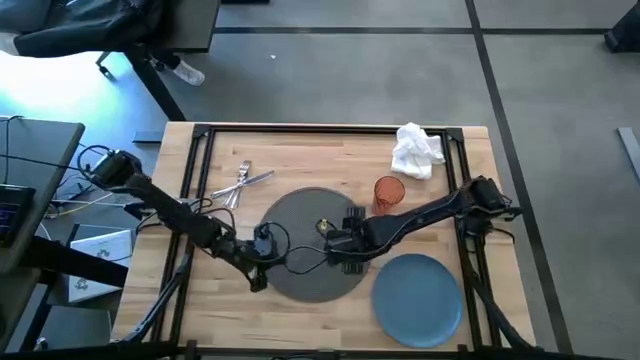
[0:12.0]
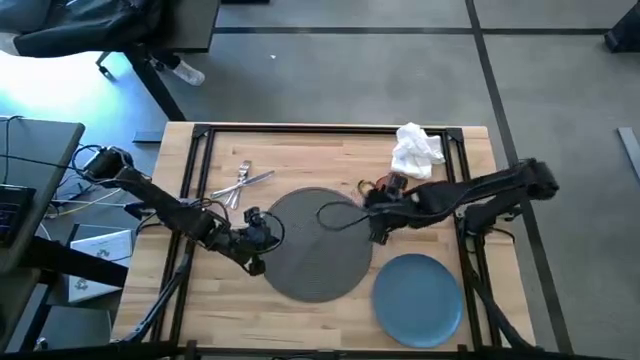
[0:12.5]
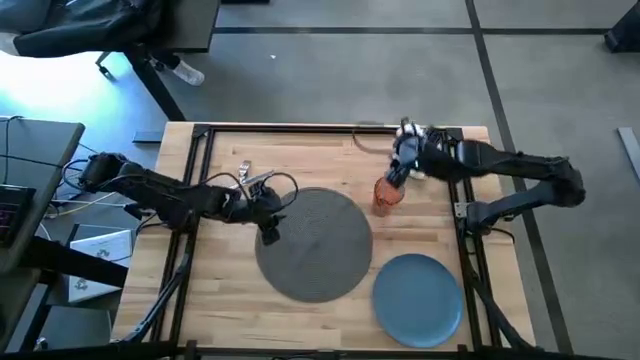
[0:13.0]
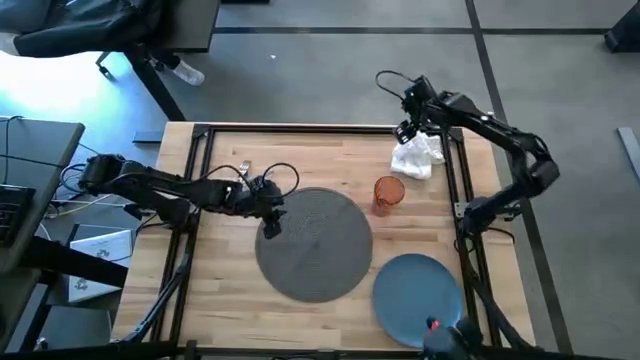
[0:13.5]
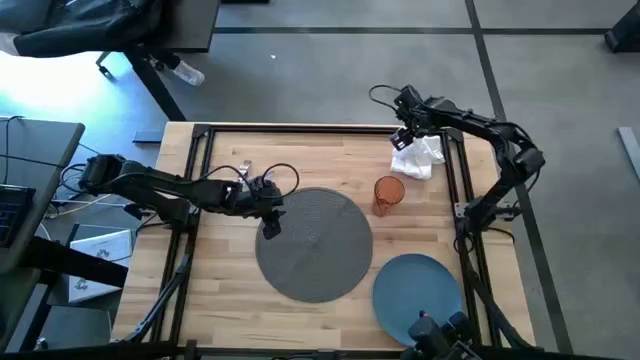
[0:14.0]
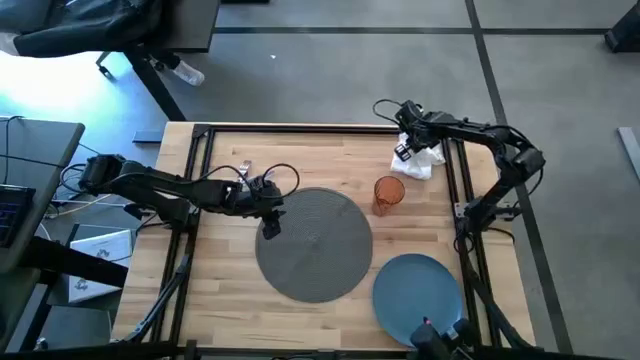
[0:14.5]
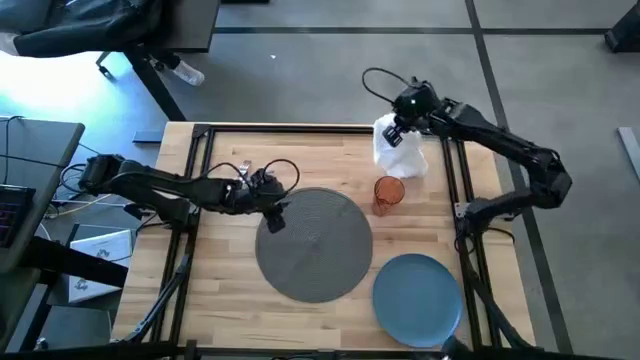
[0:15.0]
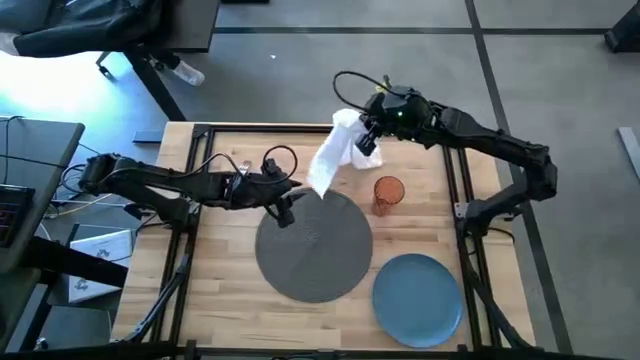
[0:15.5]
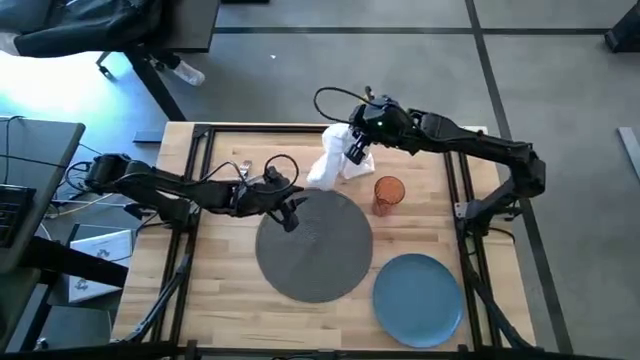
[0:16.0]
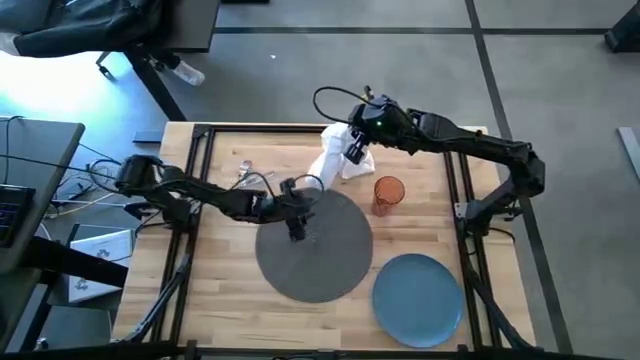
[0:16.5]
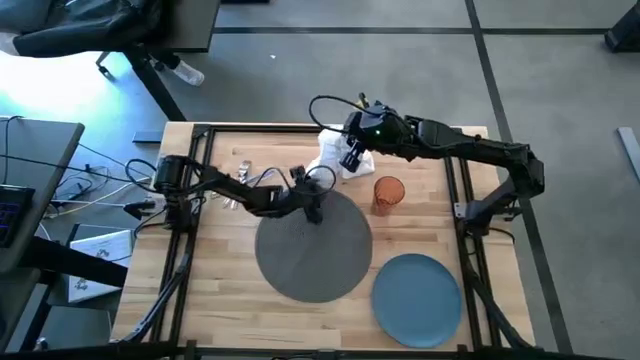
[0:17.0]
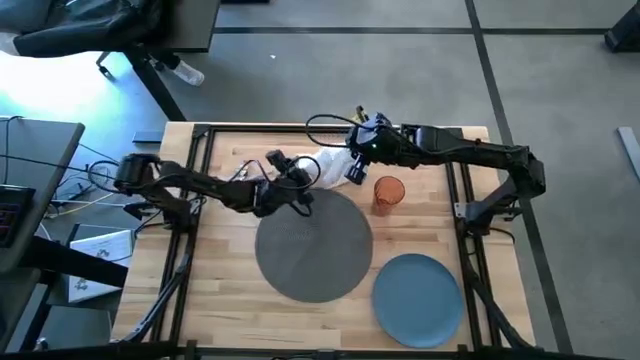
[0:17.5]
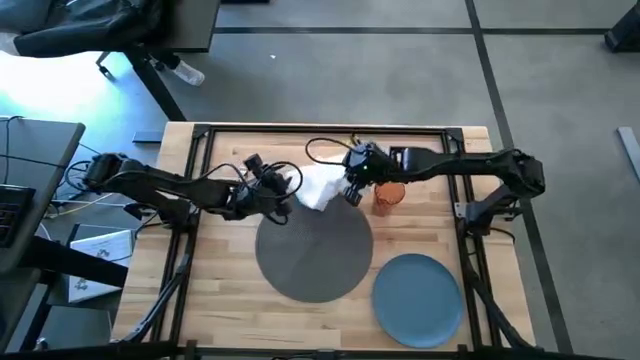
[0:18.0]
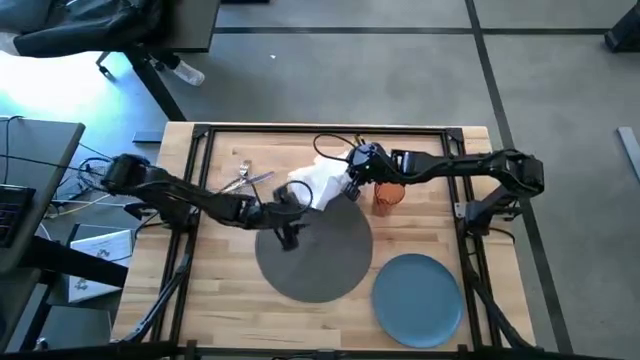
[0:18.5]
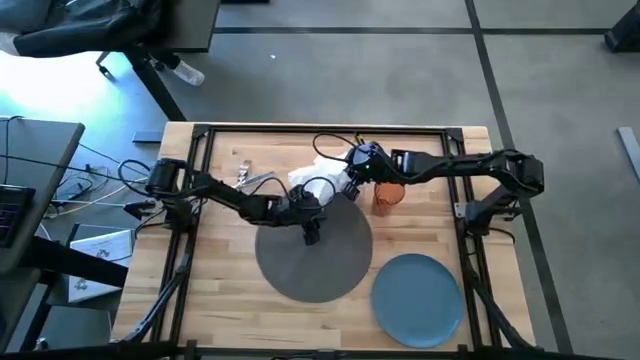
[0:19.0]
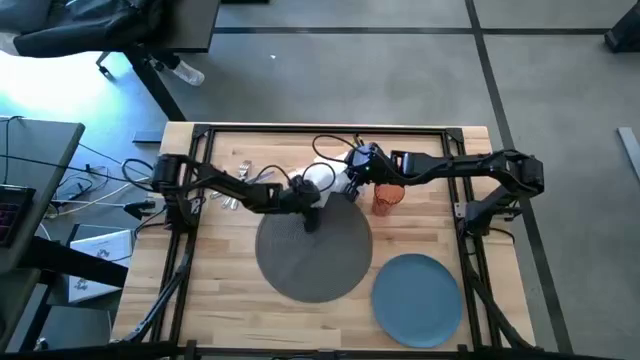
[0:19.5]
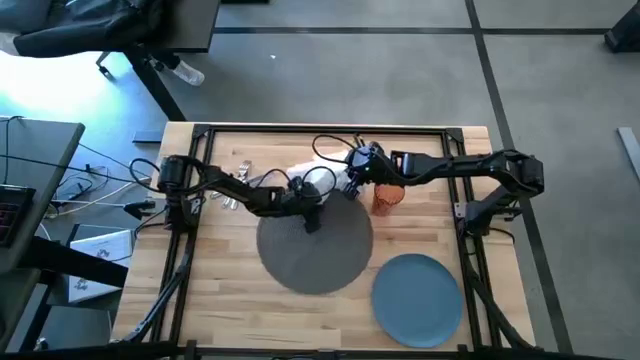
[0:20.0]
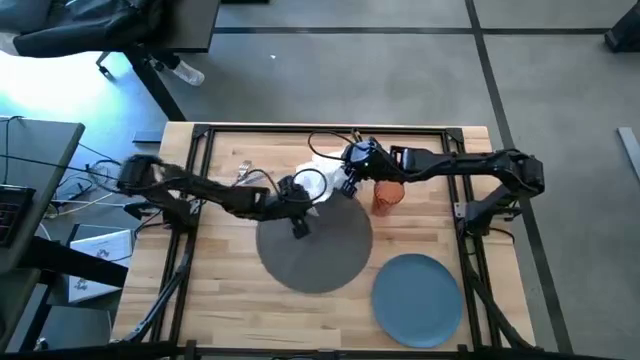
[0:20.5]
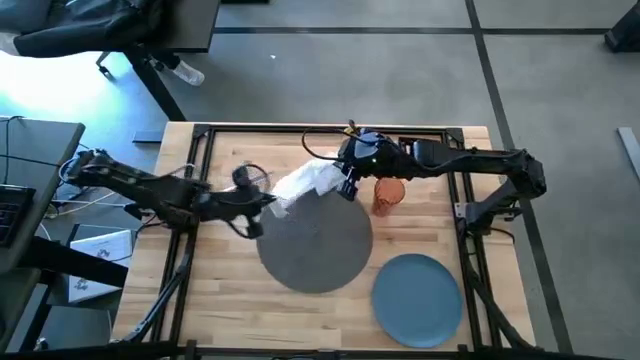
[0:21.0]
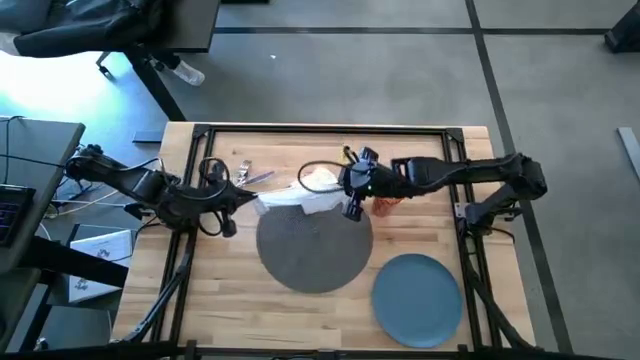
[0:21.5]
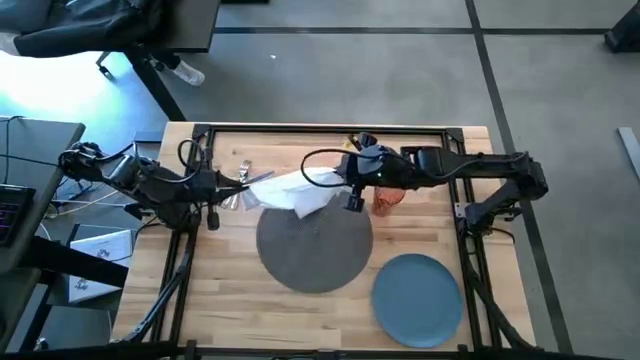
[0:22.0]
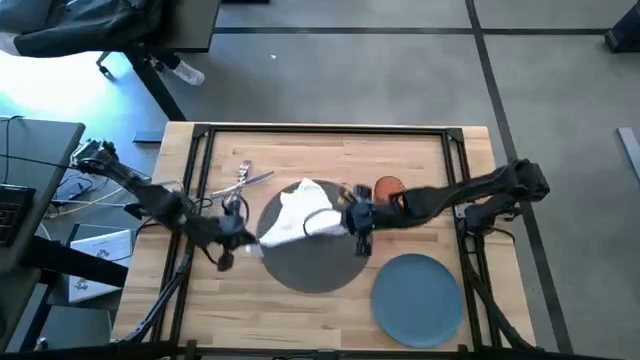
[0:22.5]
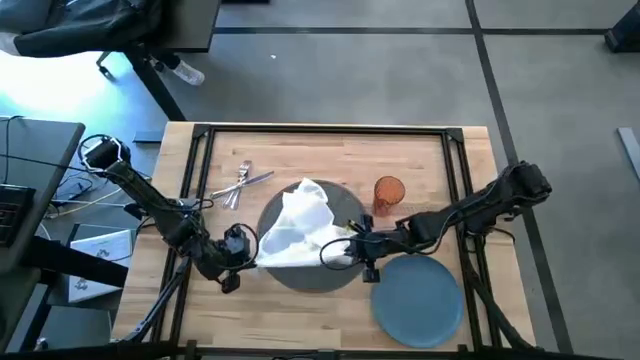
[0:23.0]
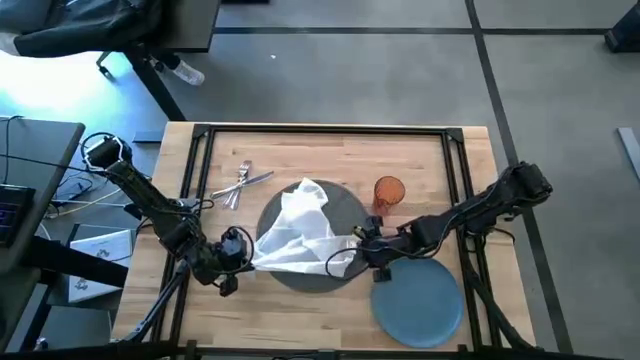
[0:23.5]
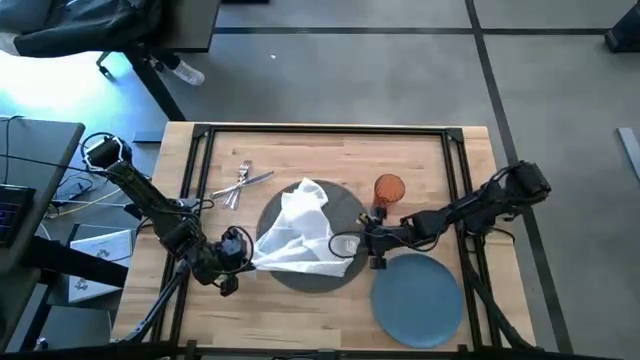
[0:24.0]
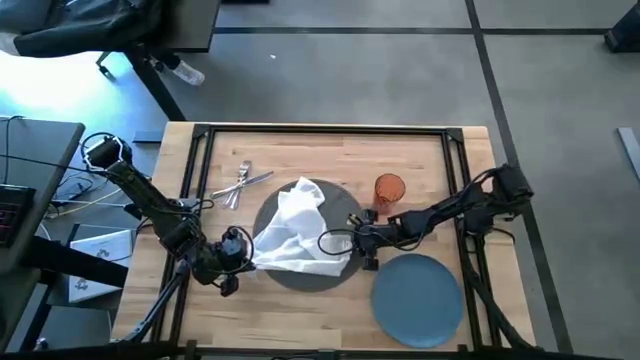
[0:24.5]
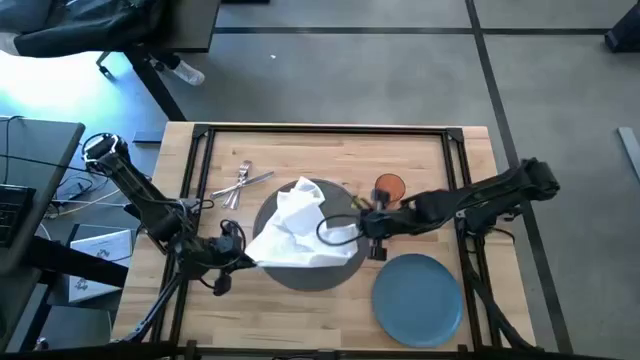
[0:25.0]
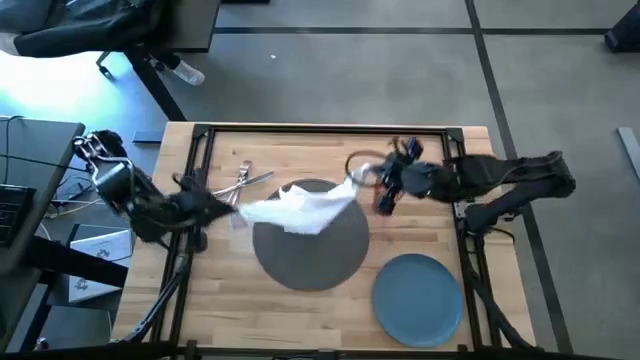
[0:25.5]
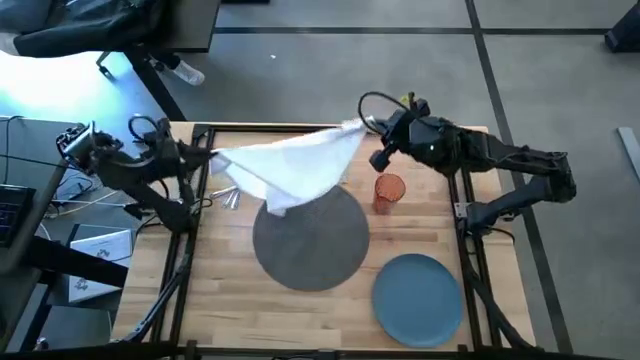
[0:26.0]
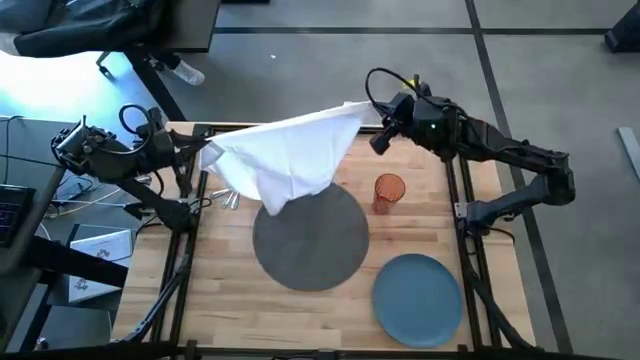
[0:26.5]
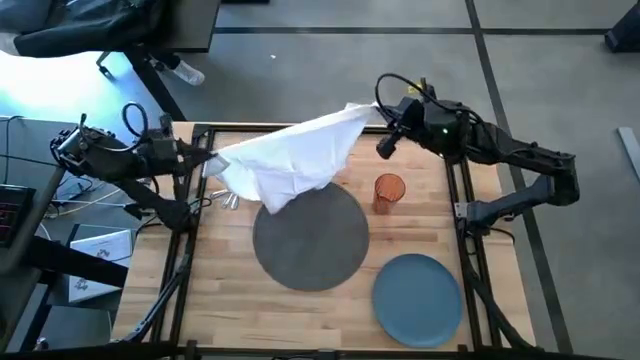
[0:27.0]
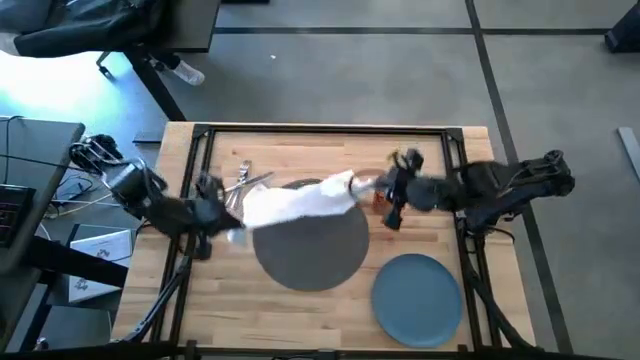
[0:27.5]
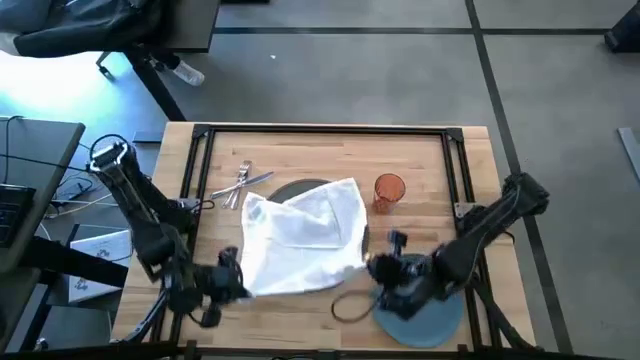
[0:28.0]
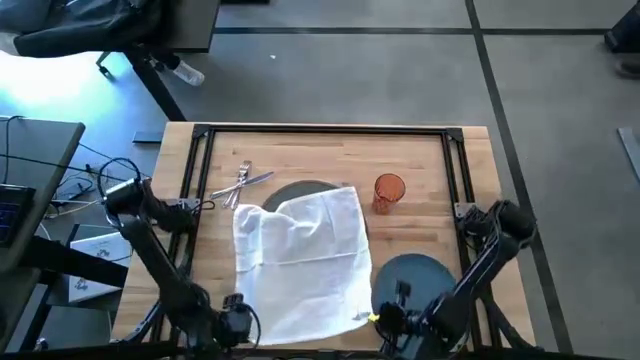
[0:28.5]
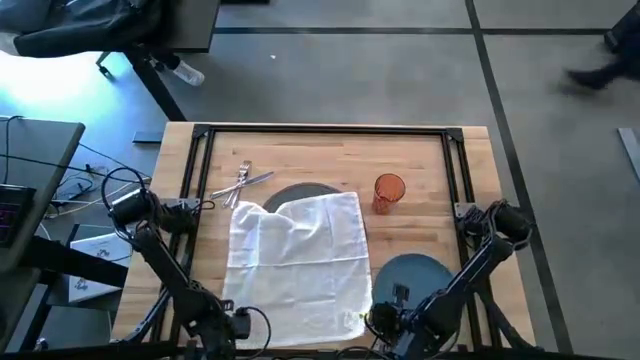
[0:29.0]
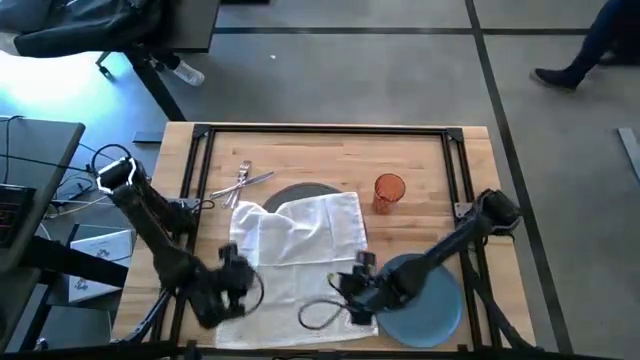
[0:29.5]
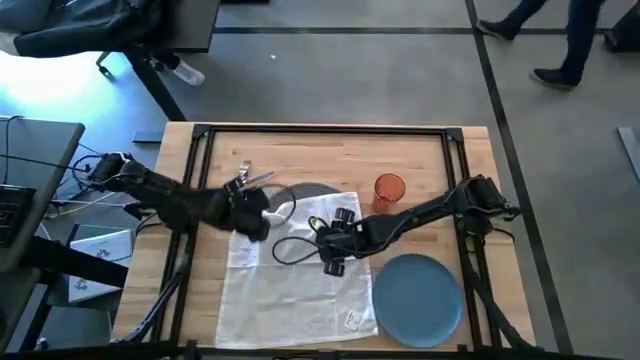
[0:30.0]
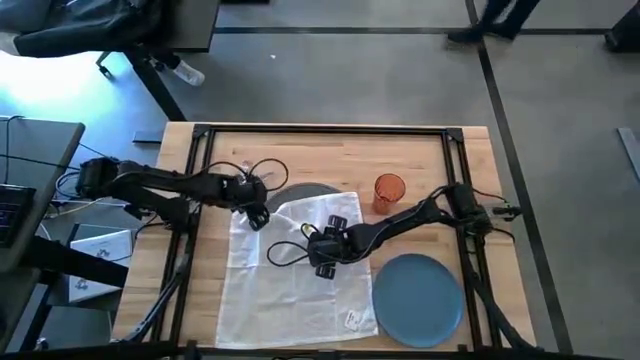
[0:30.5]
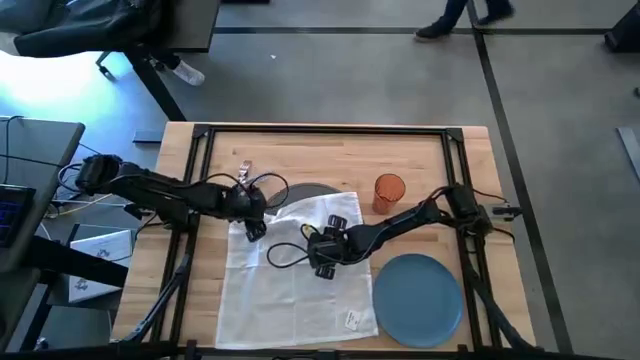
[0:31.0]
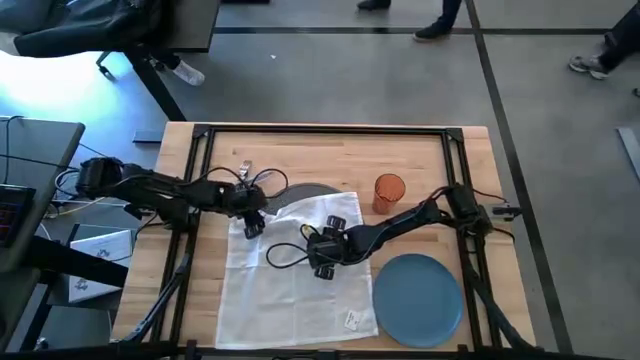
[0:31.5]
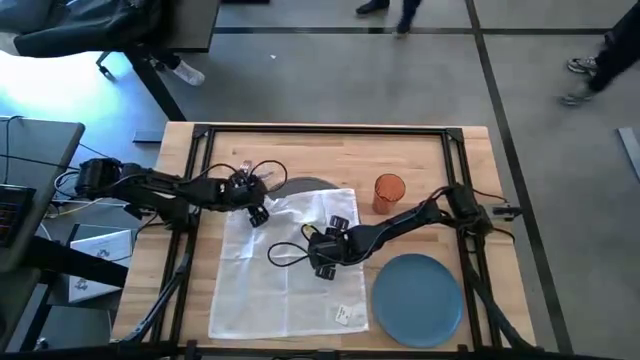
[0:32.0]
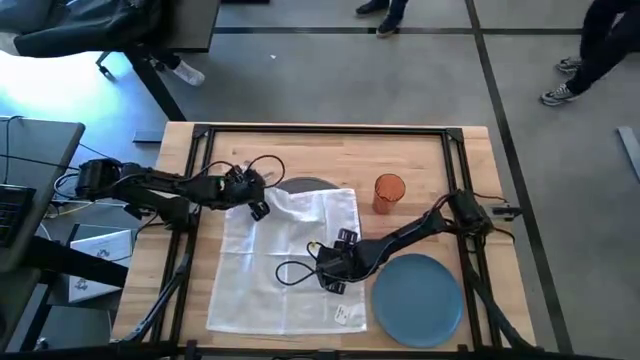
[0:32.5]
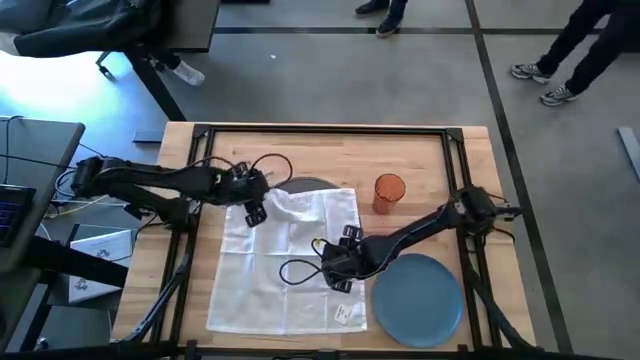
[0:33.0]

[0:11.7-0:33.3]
Task: Set table place
Fold the white table napkin
